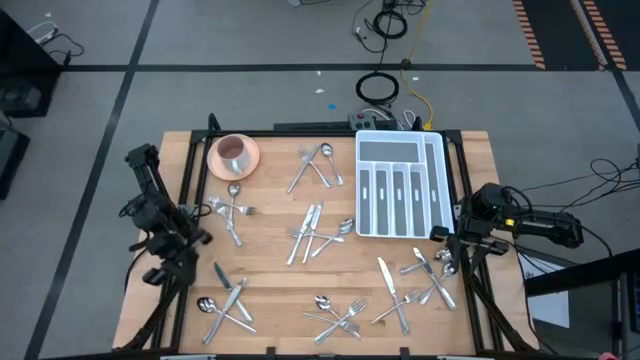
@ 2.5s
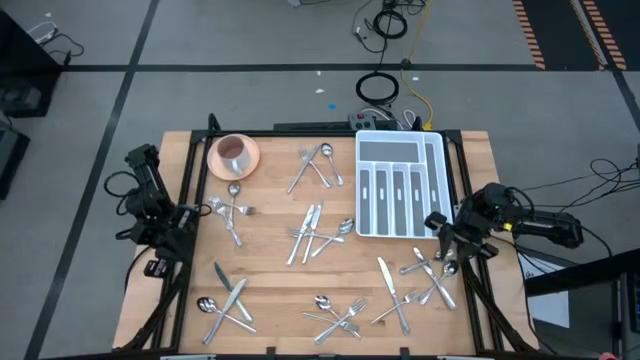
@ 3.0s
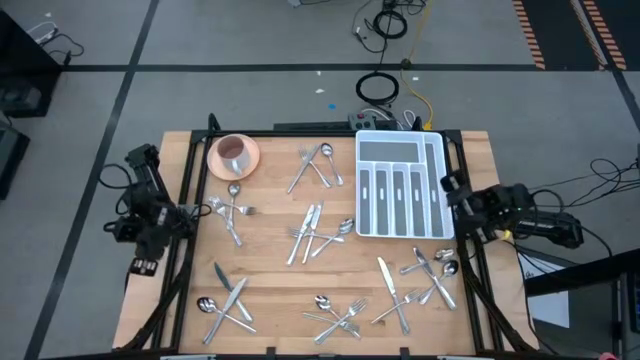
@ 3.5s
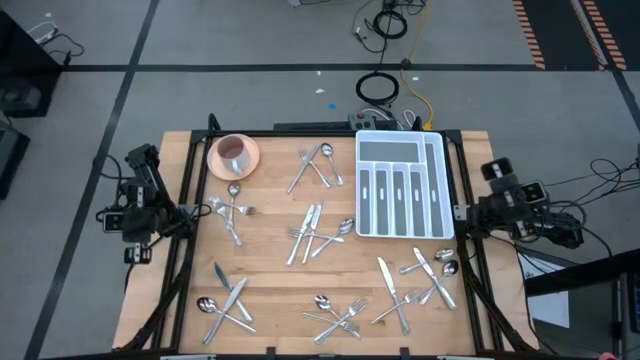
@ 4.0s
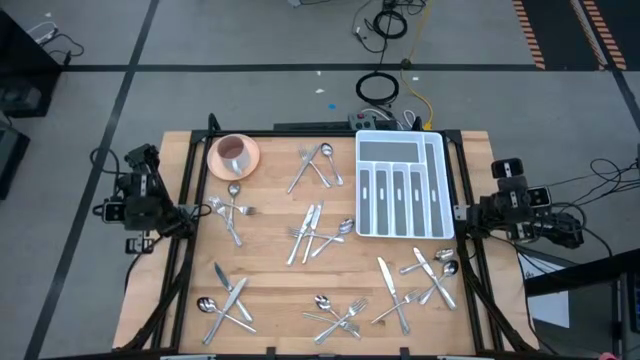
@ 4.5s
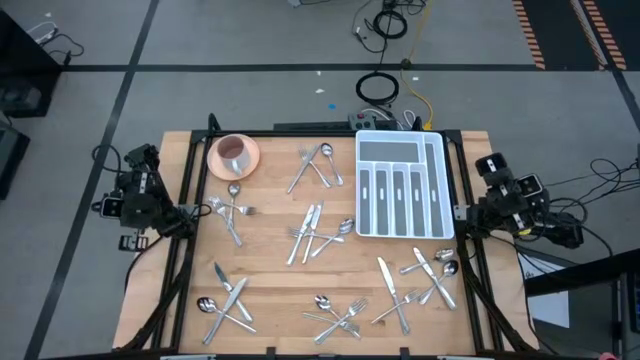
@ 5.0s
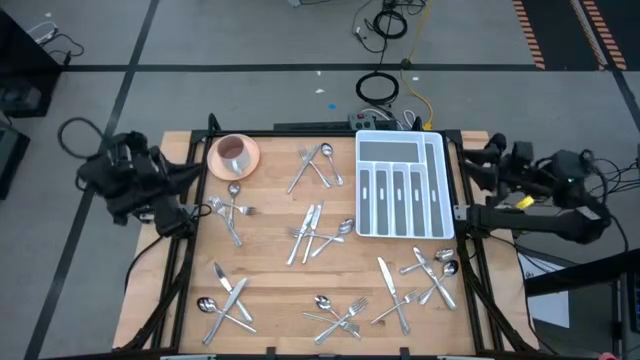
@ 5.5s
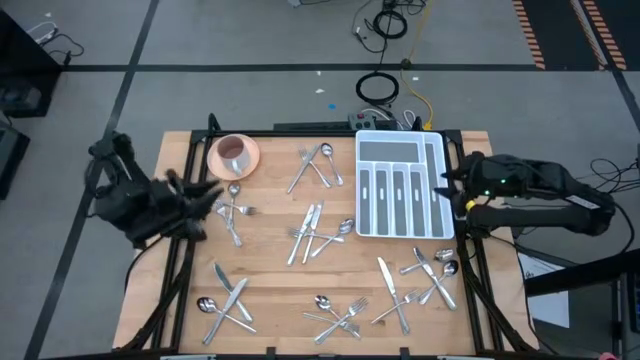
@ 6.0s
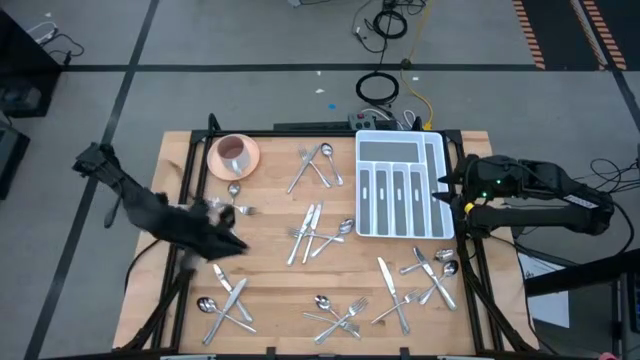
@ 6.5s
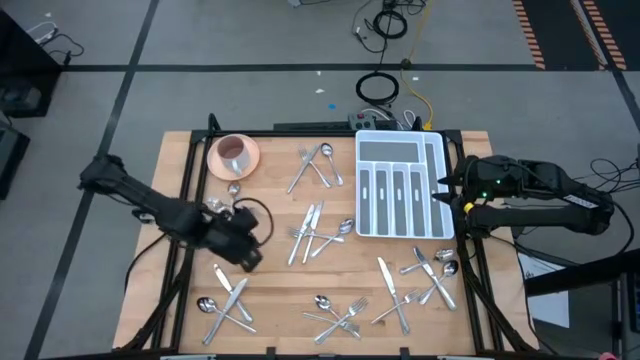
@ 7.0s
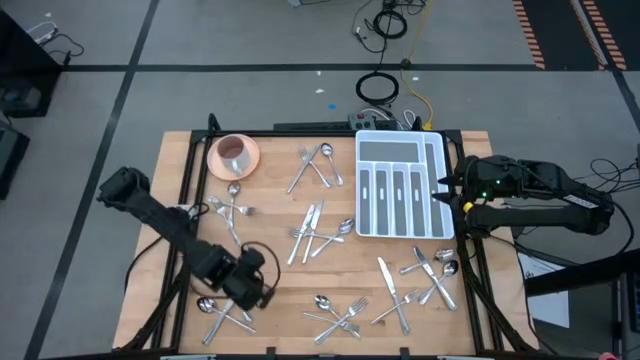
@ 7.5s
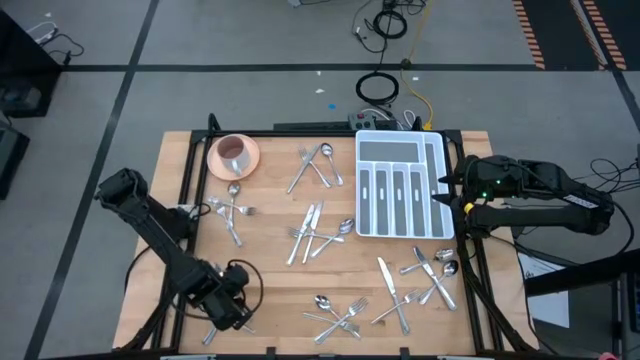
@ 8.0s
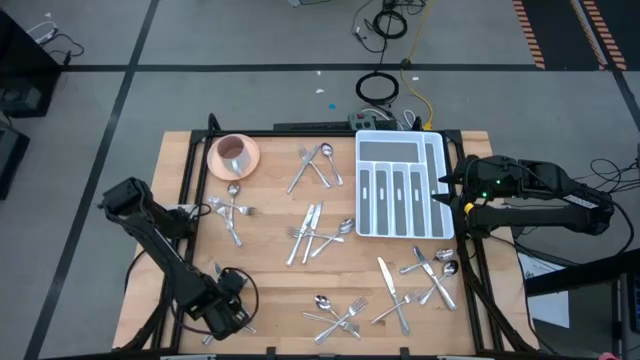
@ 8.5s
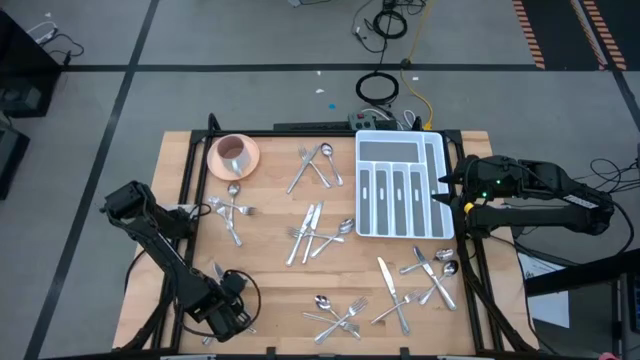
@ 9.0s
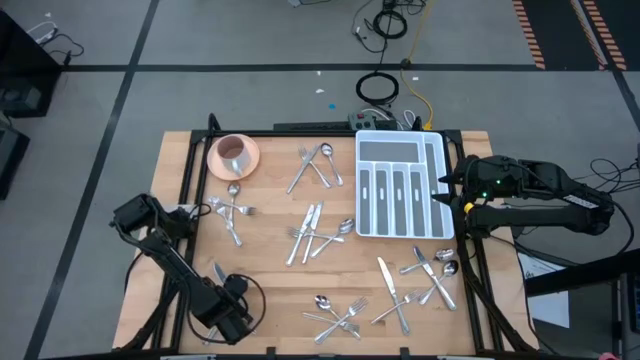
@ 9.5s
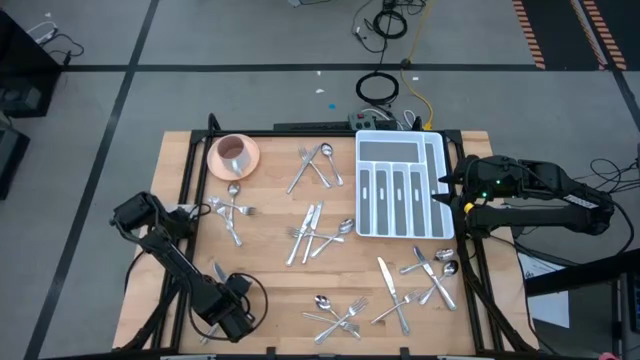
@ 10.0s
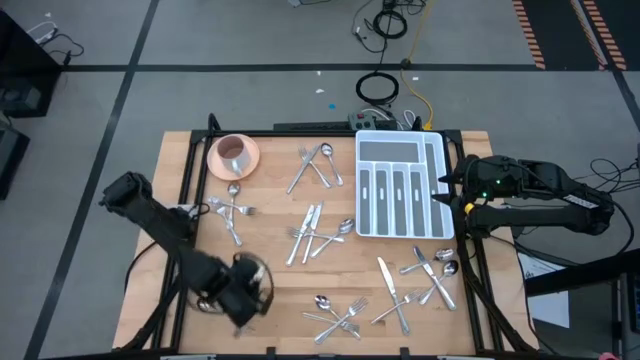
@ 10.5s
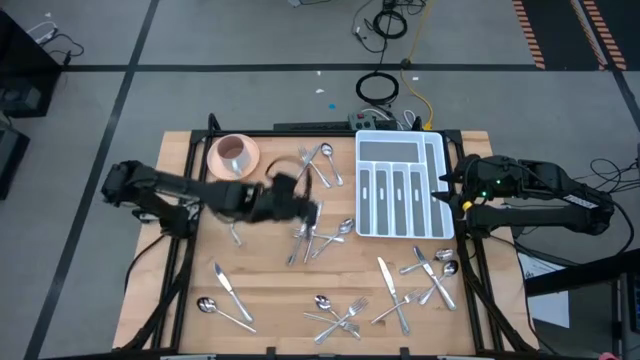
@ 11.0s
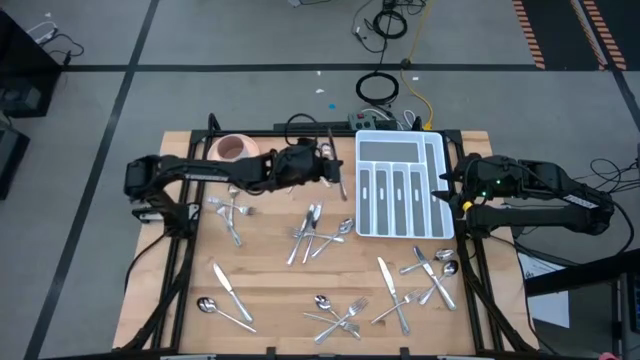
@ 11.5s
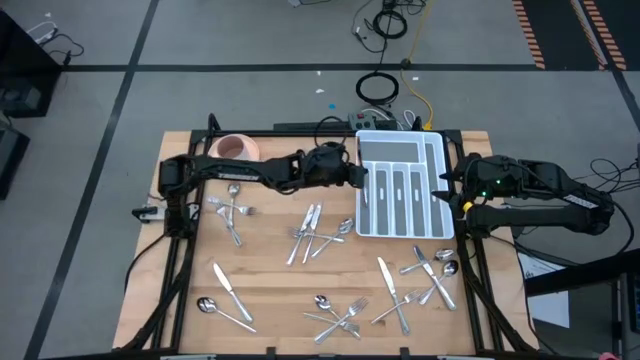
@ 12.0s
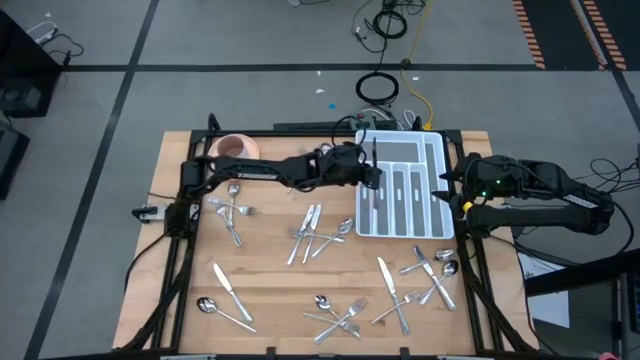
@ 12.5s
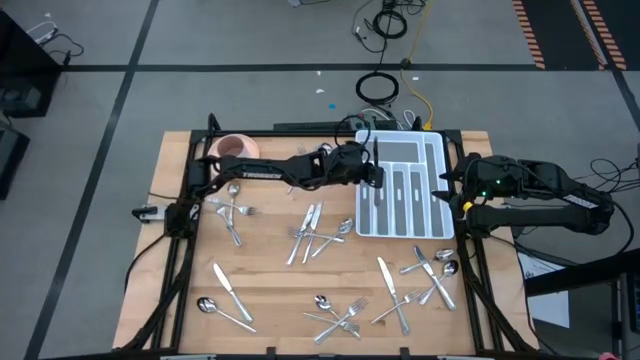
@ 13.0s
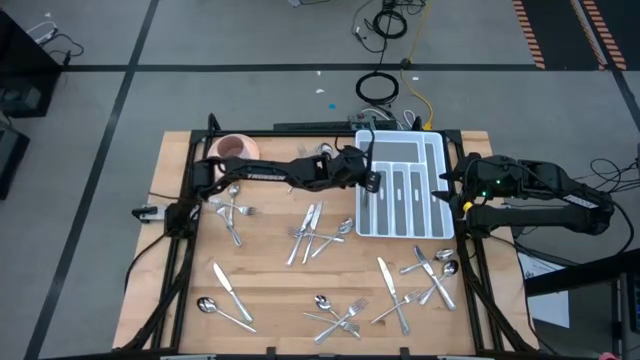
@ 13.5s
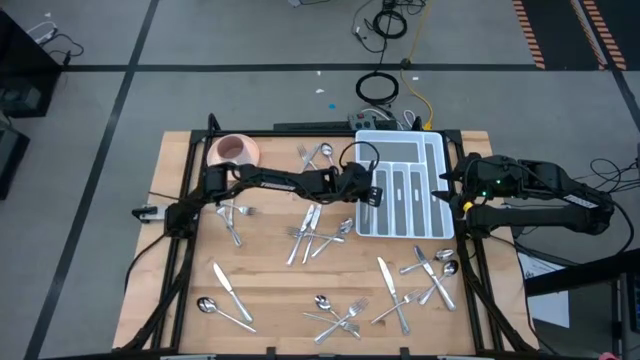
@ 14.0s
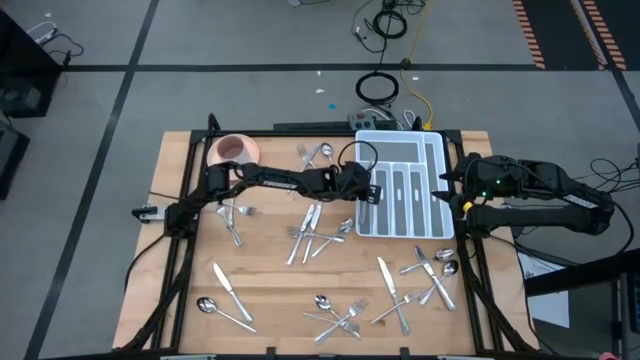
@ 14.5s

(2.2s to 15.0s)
Task: Sort silverware
Put the silver knife into the white cutlery tray

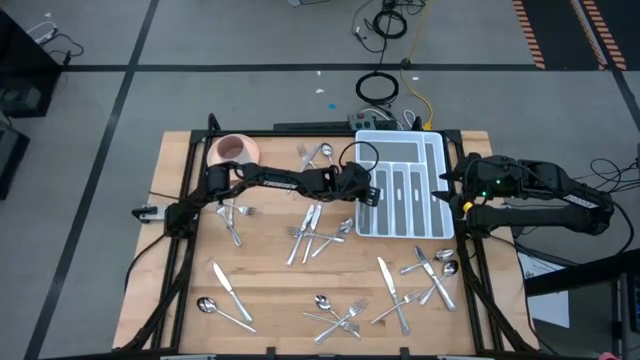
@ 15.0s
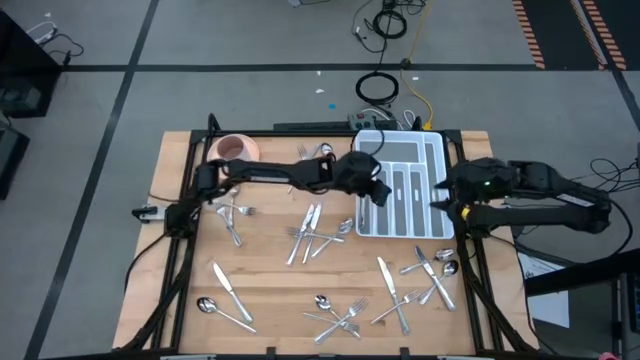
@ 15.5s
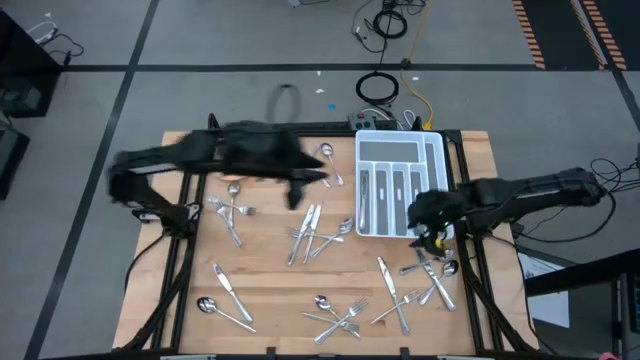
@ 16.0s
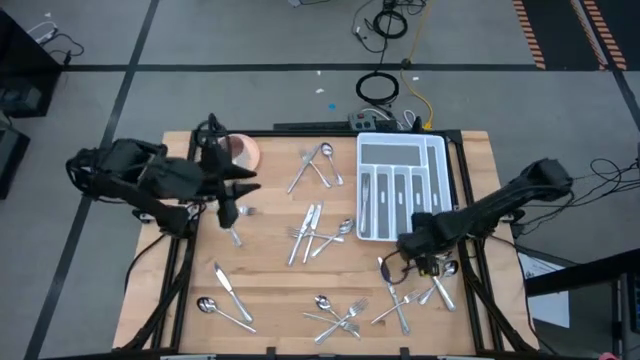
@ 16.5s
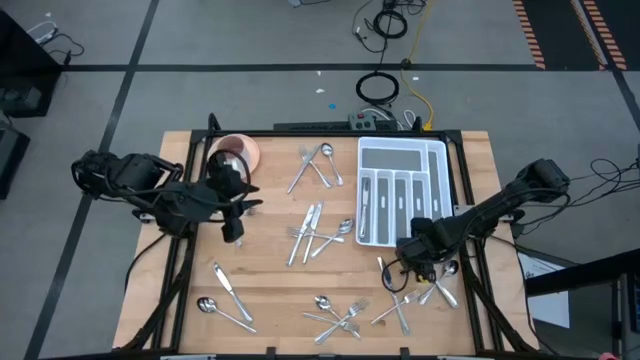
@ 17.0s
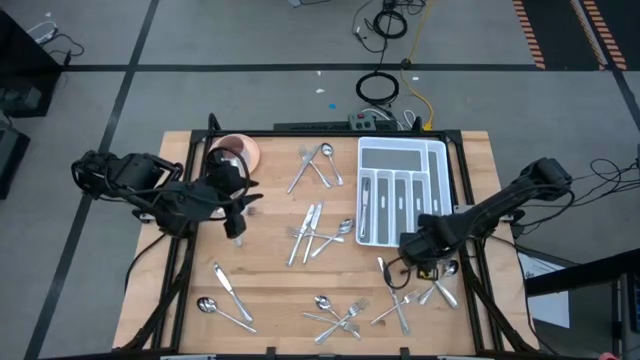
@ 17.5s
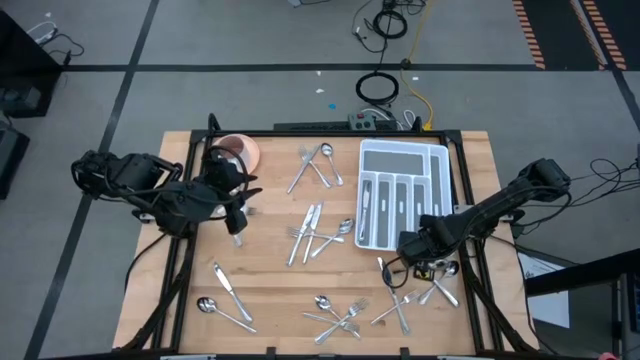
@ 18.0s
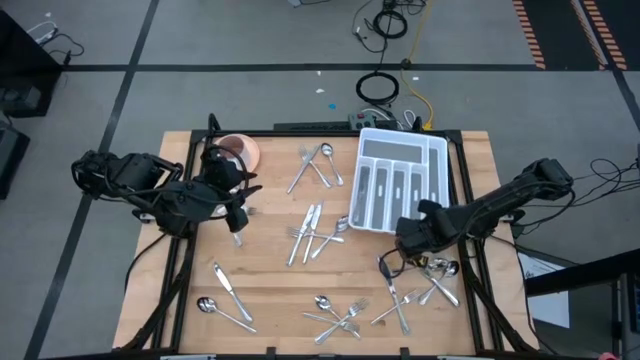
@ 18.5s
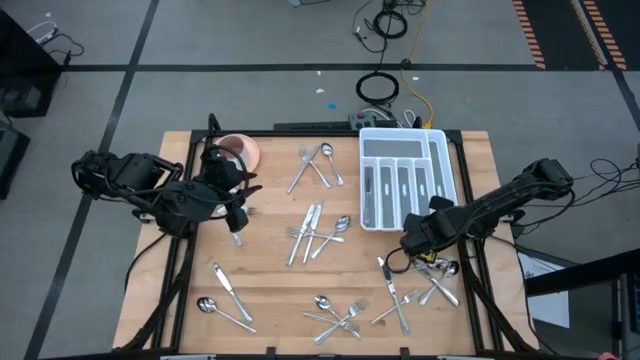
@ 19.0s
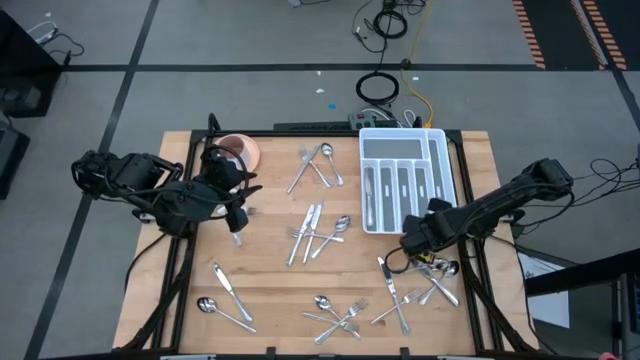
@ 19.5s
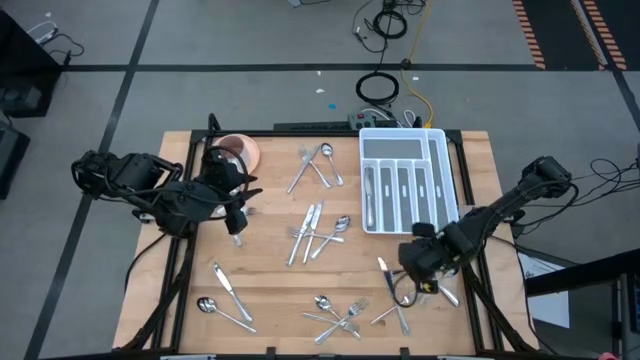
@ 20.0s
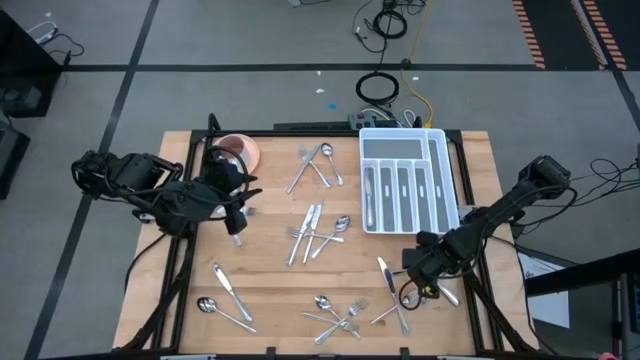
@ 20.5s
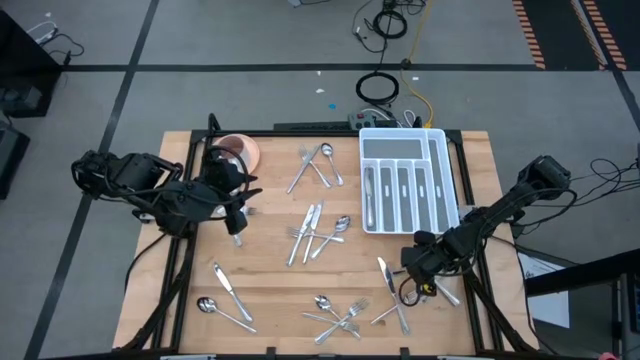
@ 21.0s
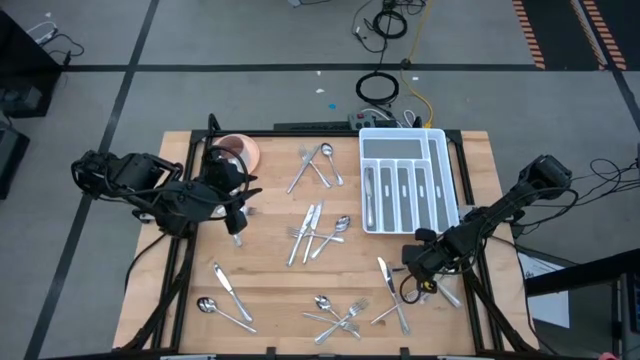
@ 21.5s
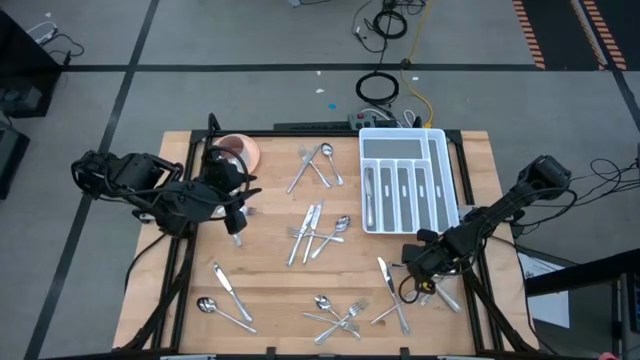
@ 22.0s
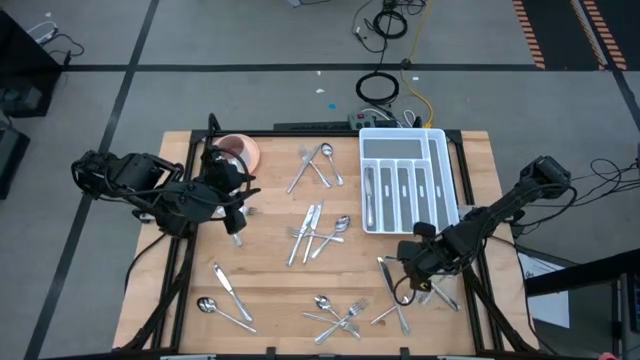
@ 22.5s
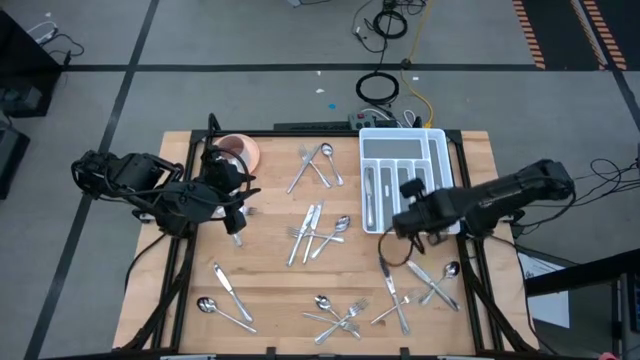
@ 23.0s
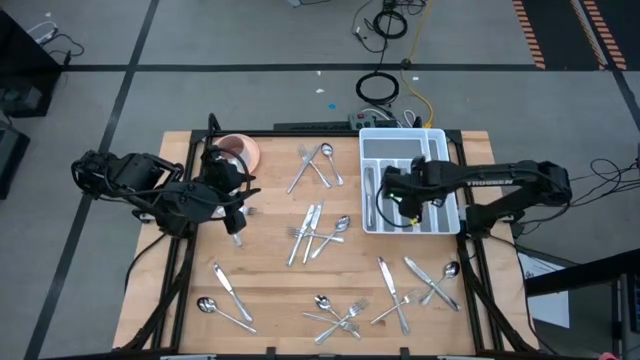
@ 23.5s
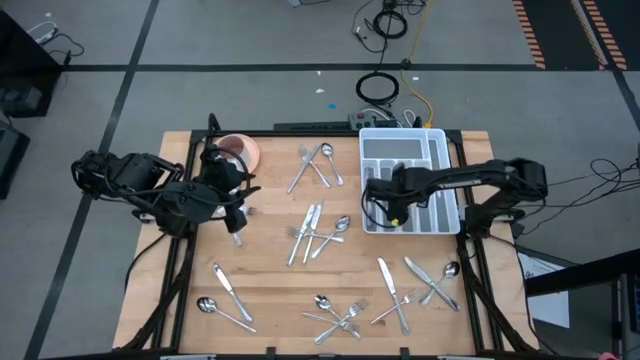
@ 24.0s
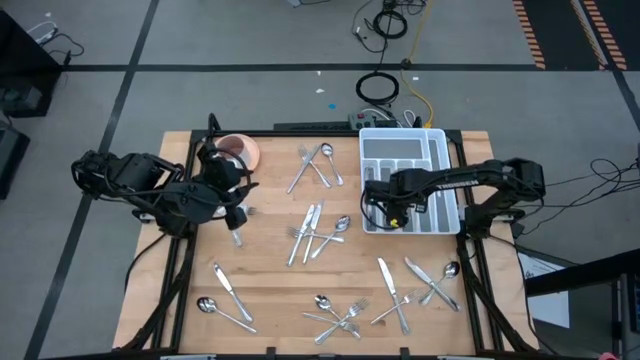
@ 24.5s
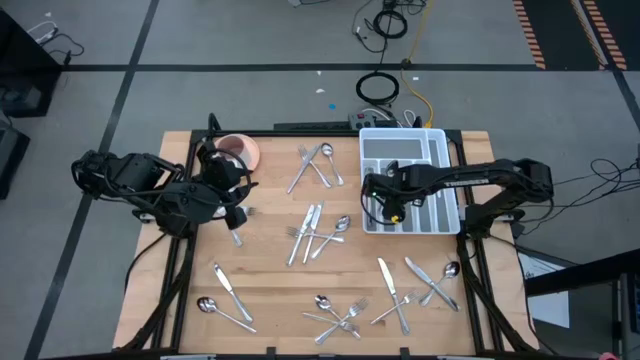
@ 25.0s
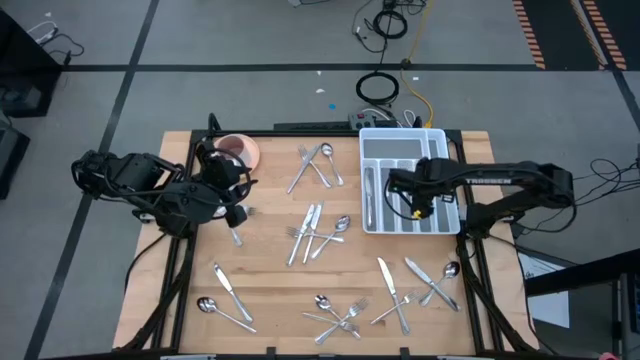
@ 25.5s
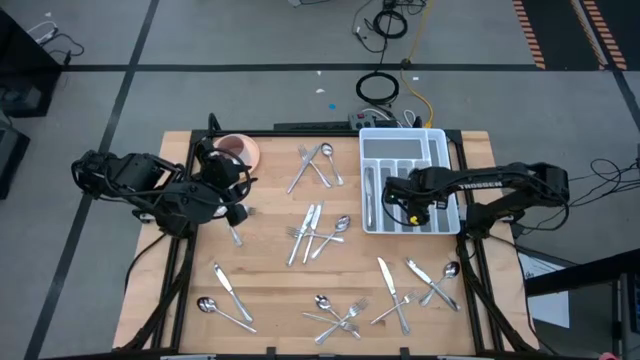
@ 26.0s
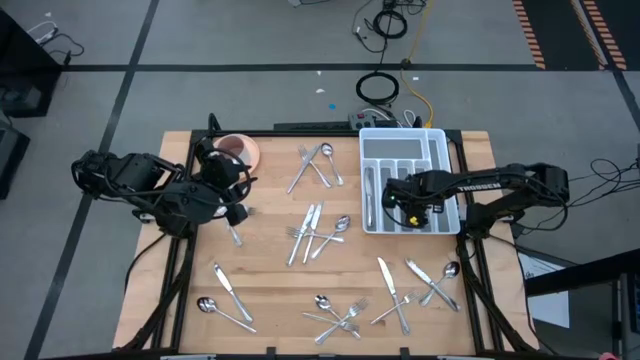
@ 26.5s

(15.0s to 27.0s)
Put the silver spoon into the white cutlery tray
